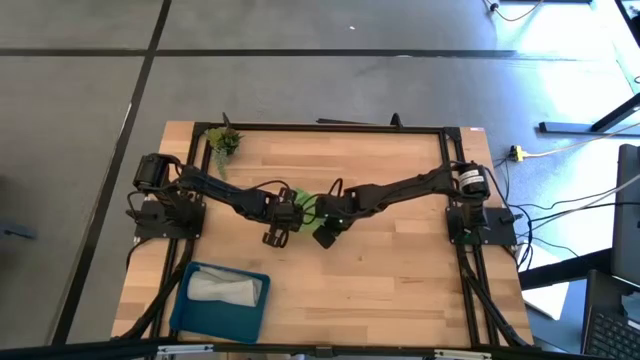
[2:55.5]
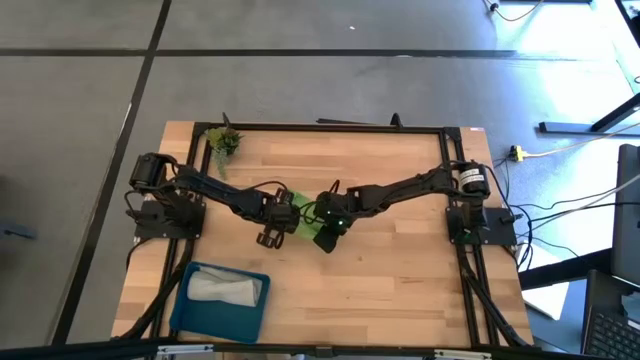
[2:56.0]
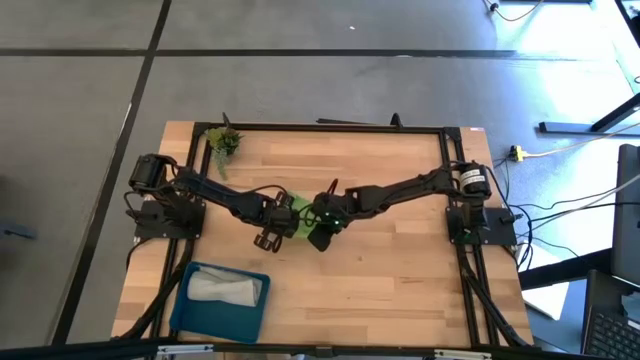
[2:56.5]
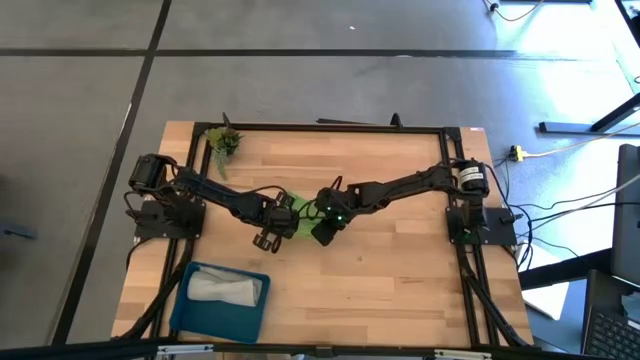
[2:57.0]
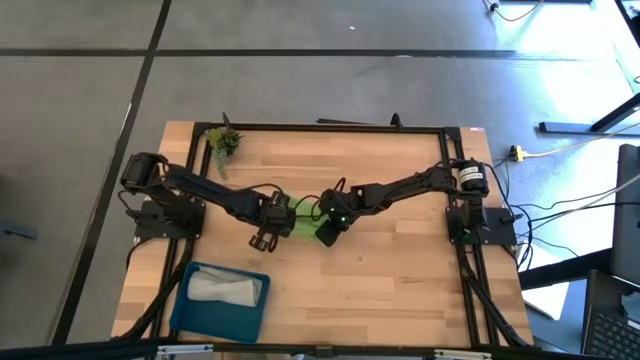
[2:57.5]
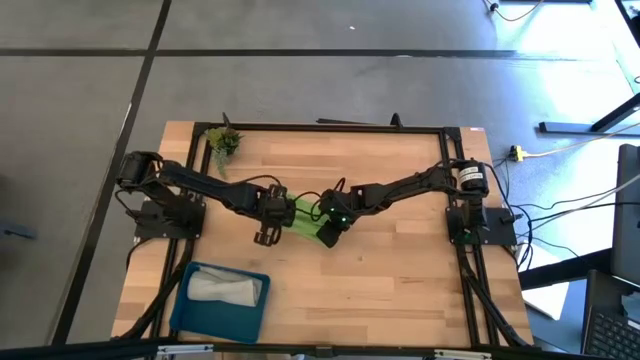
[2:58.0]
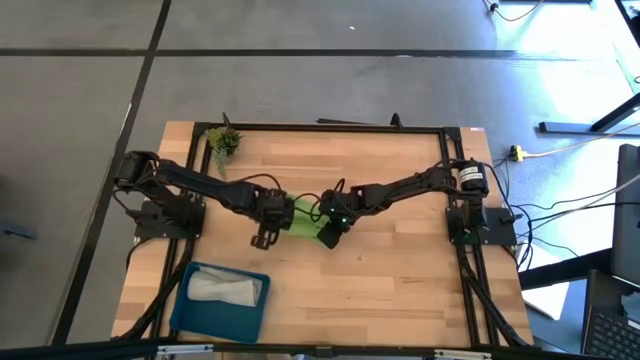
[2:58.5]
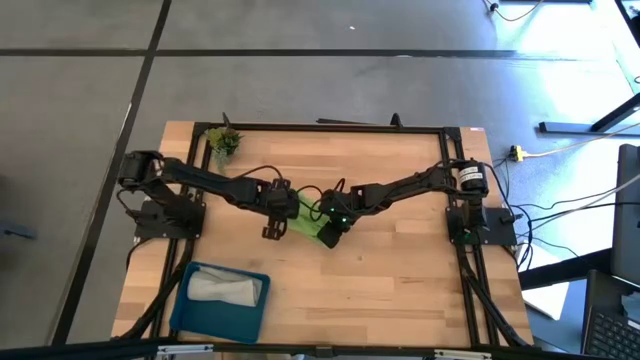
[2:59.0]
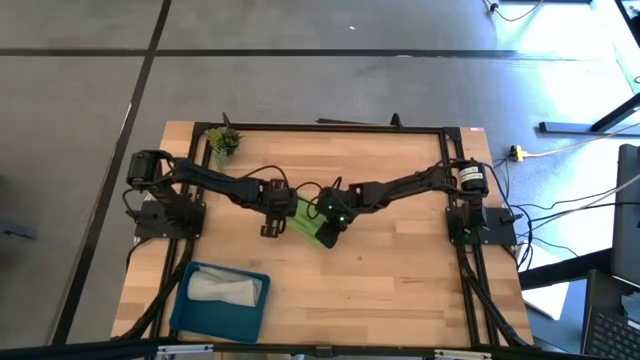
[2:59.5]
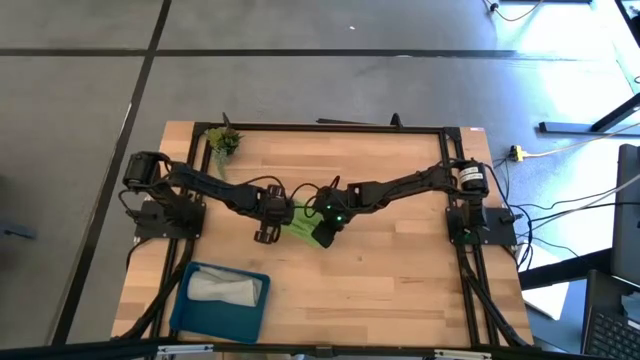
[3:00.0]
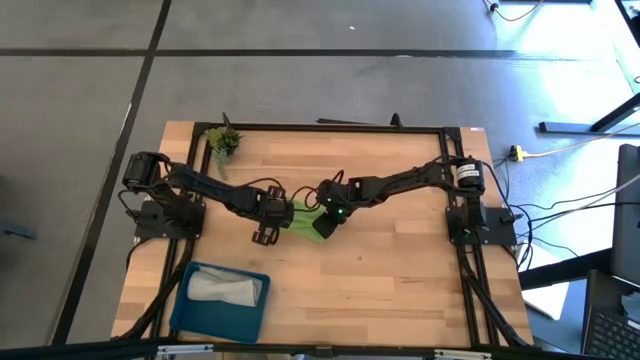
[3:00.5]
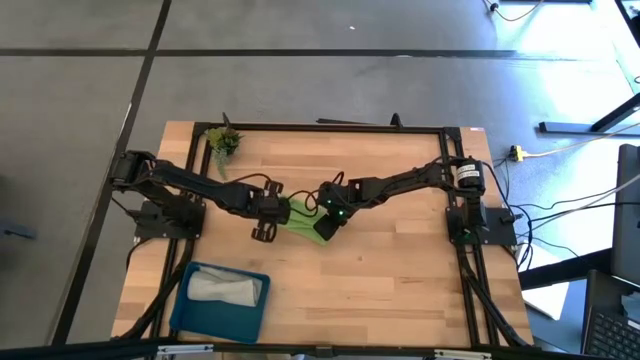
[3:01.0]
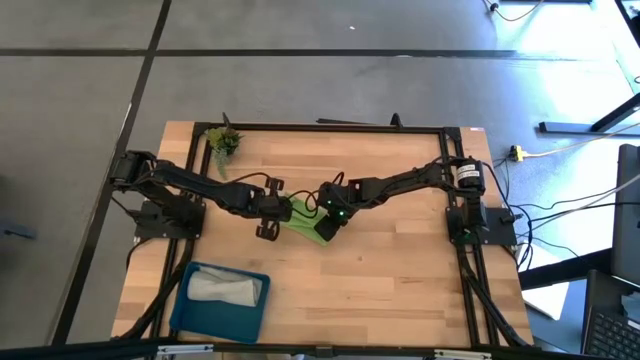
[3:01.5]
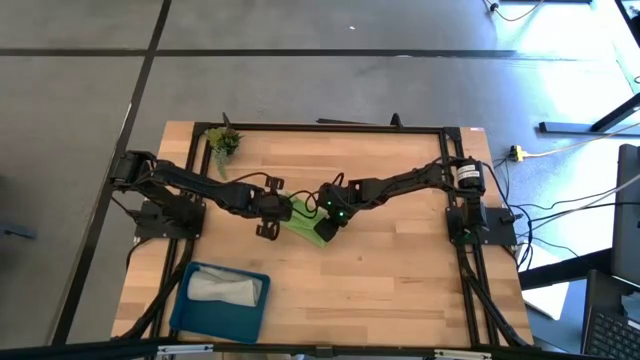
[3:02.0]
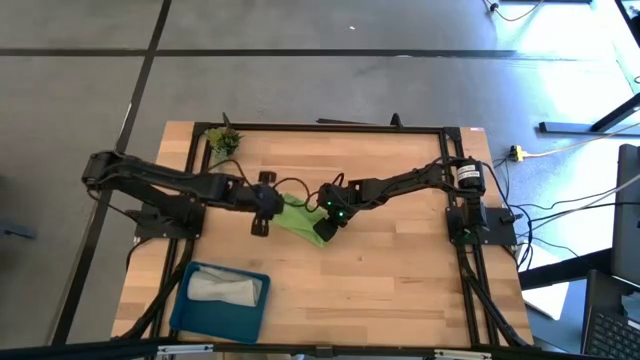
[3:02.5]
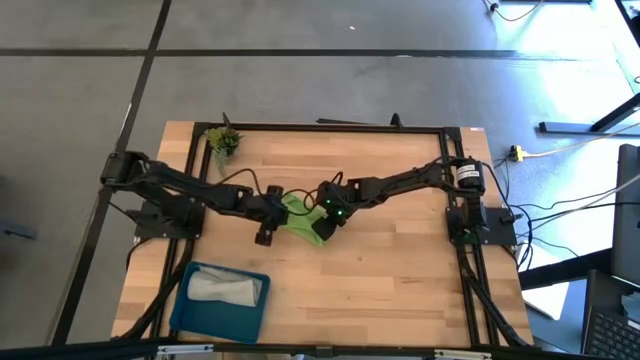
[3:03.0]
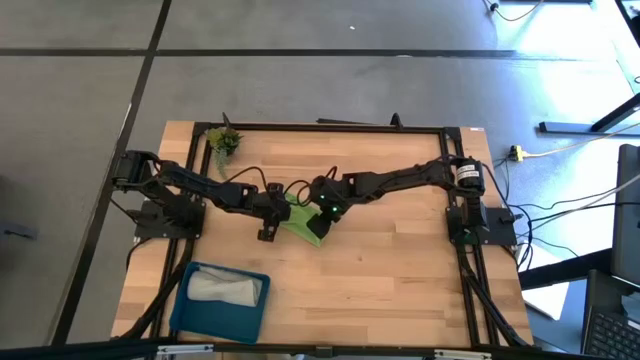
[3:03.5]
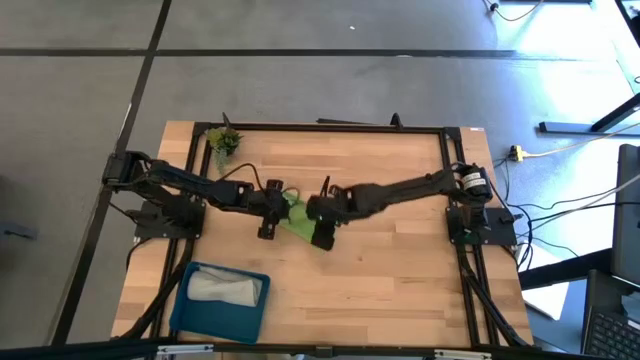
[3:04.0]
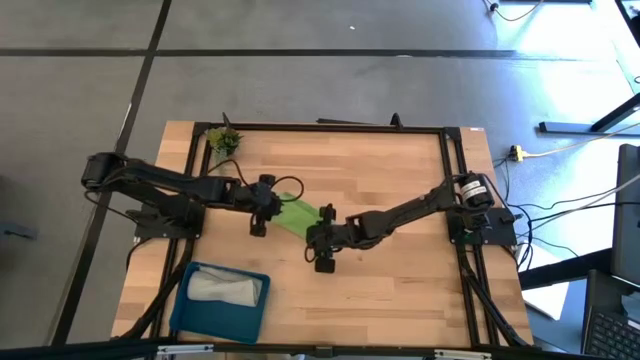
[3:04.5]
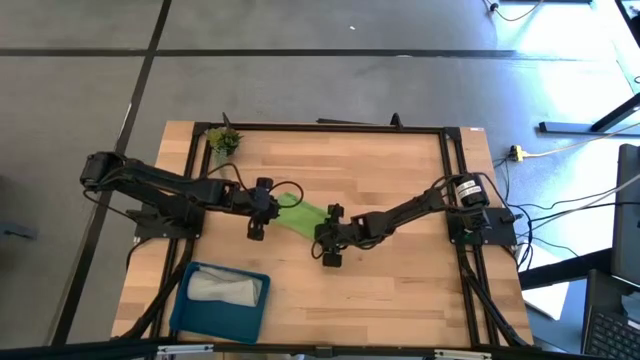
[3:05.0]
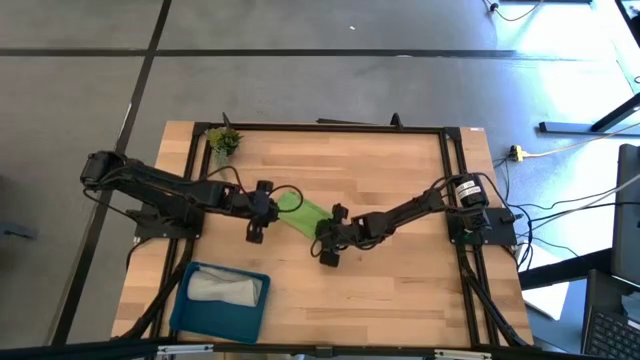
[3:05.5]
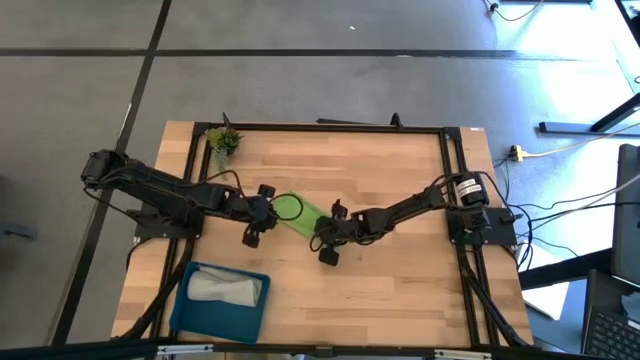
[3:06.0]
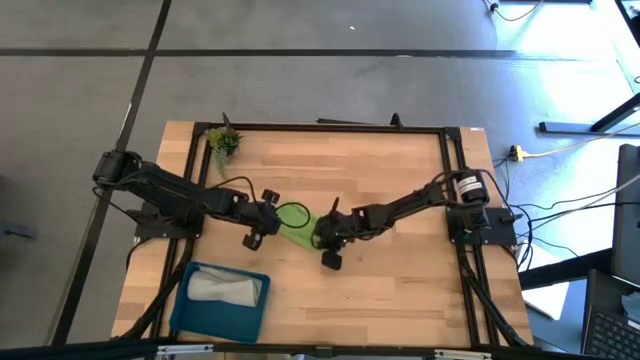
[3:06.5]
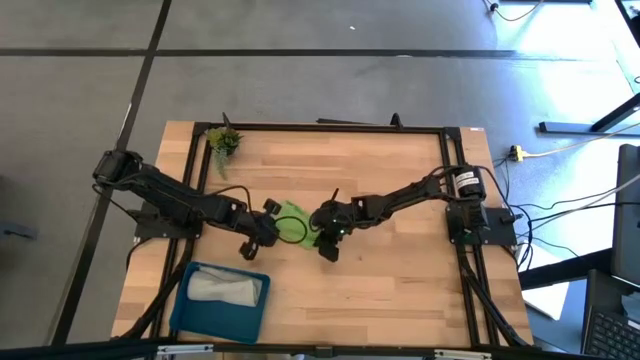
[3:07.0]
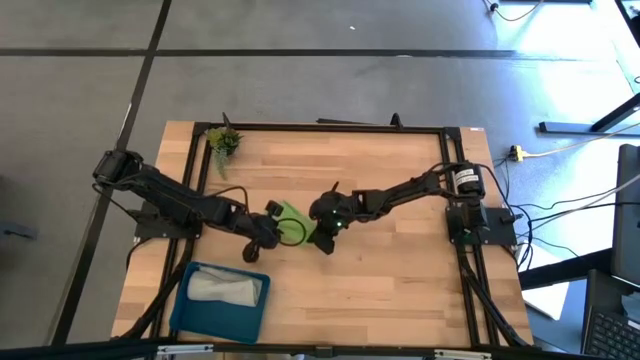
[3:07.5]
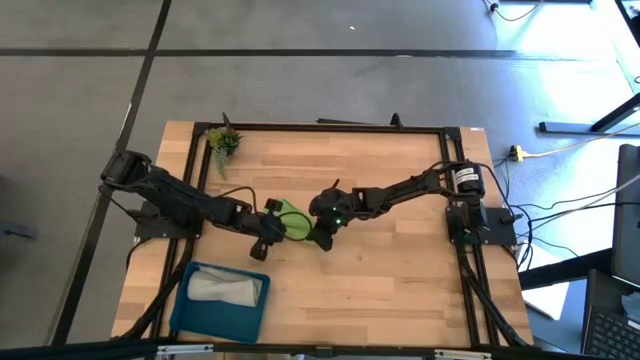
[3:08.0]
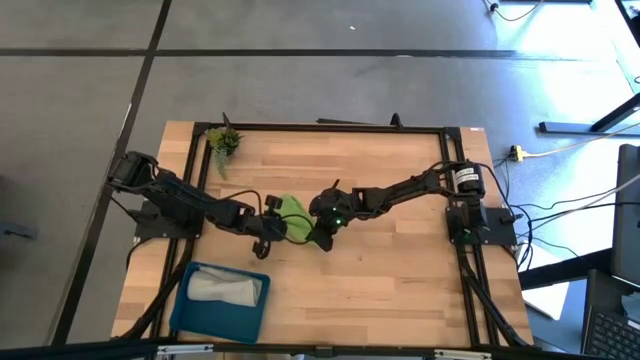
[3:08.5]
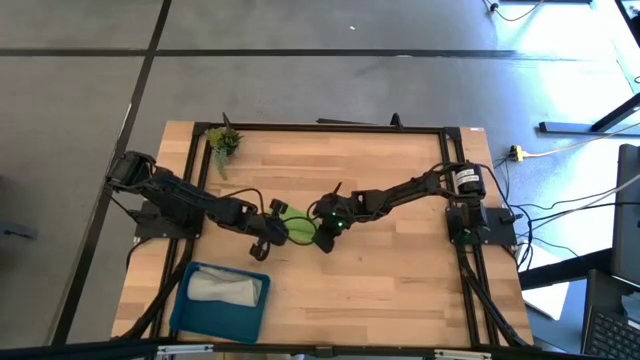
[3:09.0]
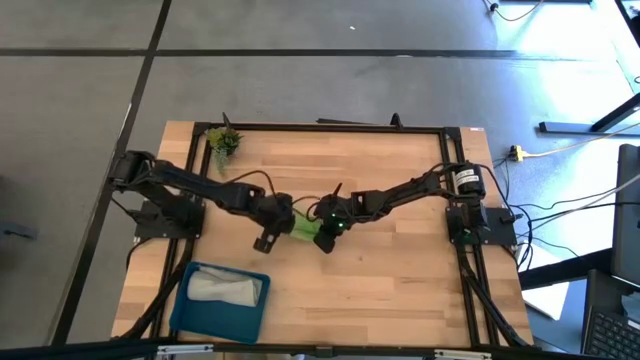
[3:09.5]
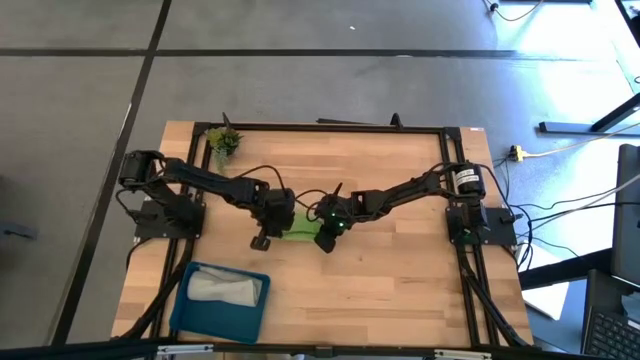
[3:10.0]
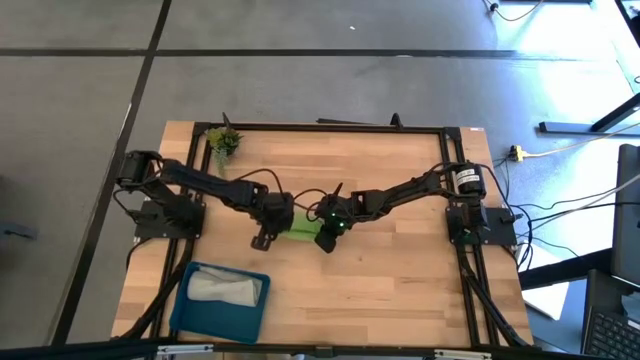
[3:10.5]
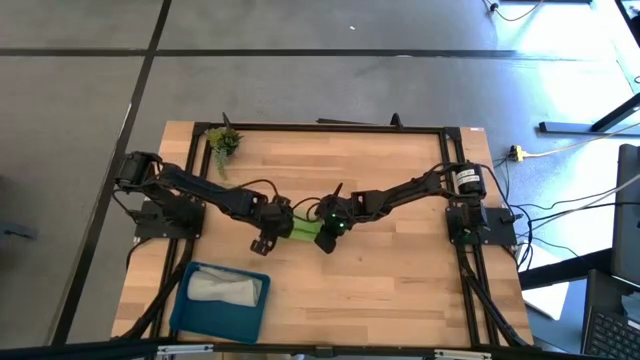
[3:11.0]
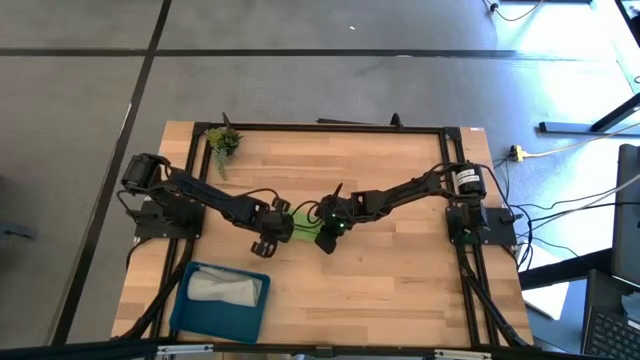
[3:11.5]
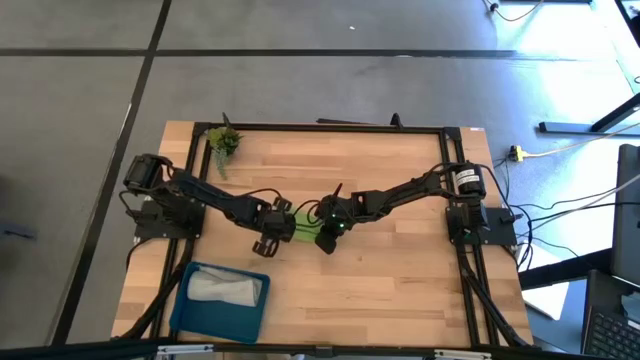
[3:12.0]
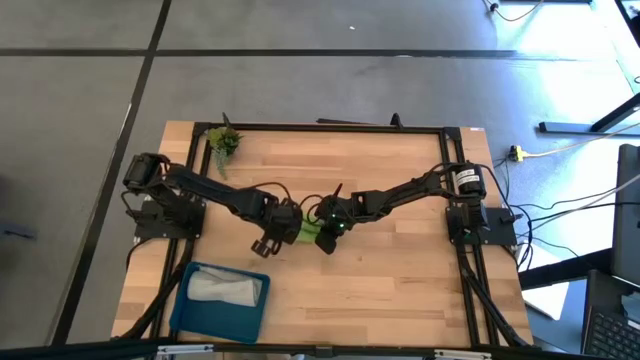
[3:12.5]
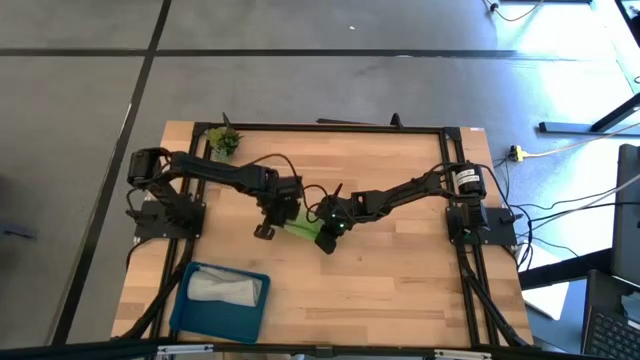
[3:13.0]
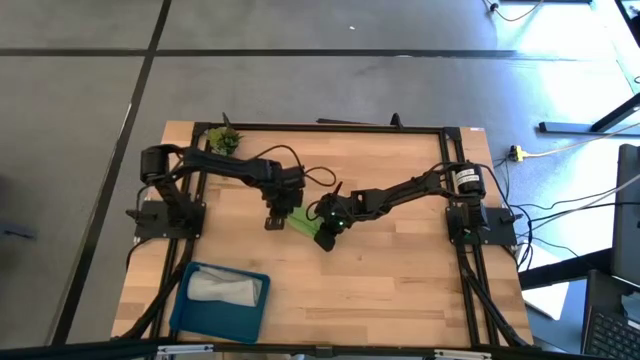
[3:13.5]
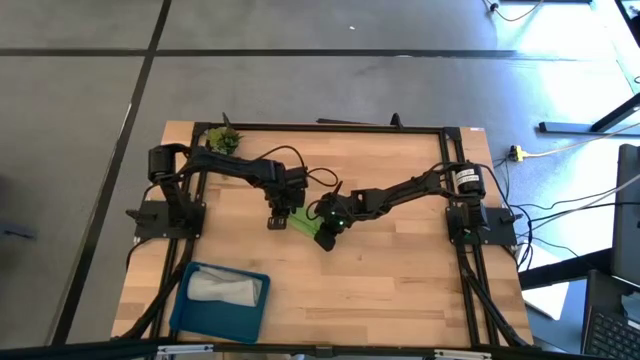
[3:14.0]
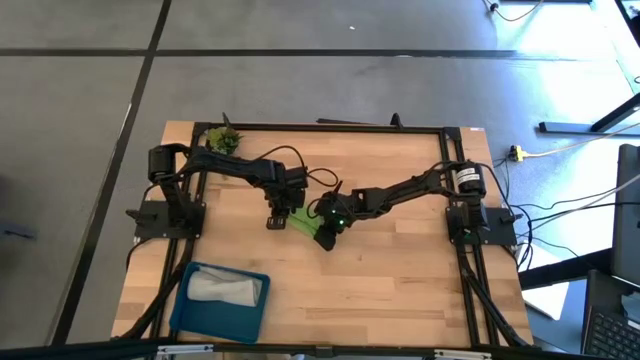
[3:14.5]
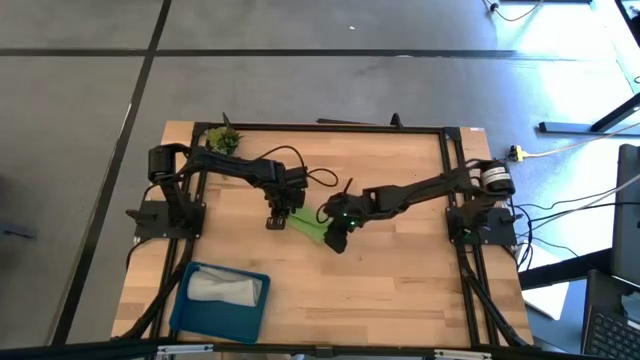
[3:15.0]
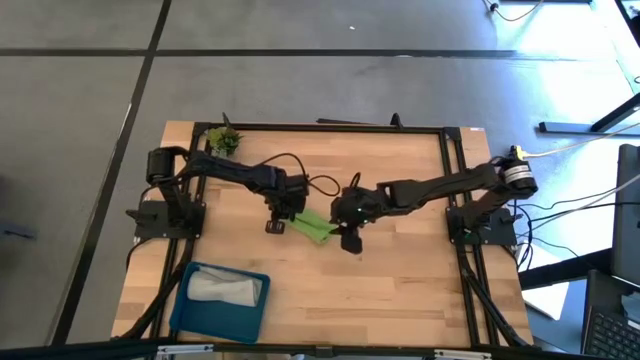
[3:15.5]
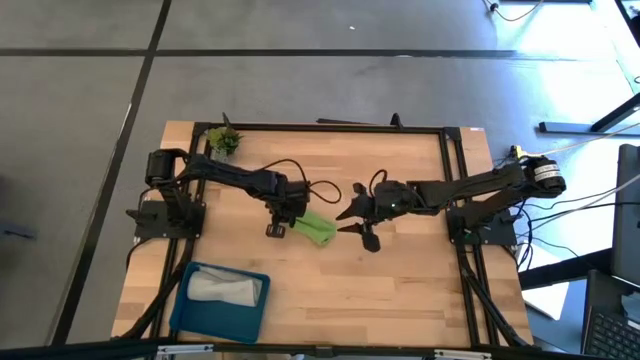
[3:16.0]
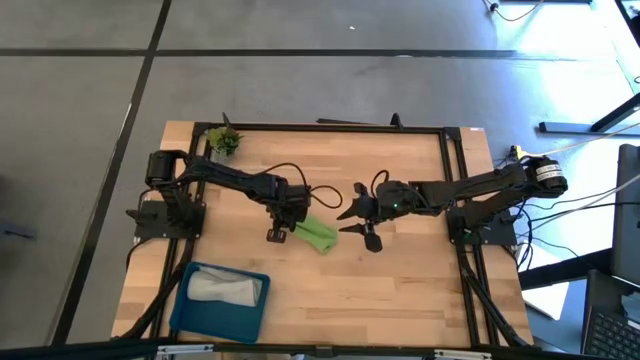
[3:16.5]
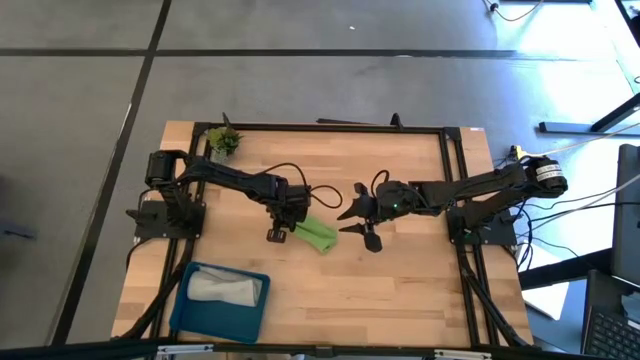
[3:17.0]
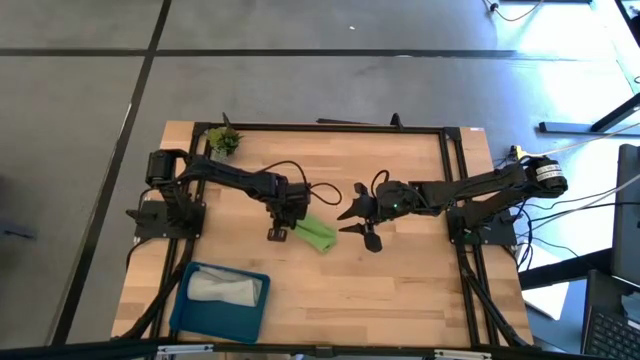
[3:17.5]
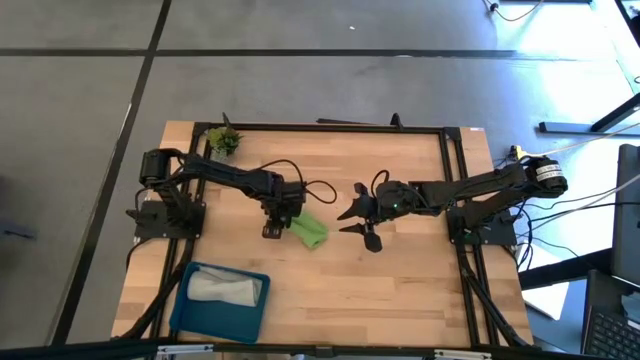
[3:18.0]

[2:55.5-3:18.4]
Task: Fold microfiber towels
Fold the green microfiber cloth
